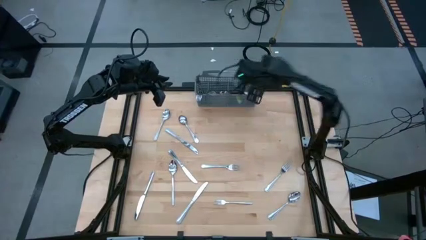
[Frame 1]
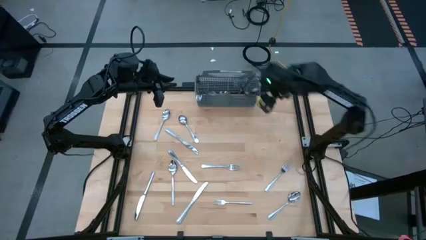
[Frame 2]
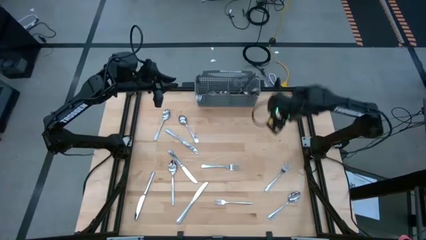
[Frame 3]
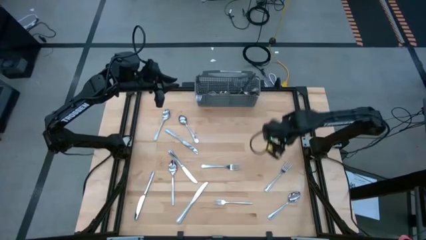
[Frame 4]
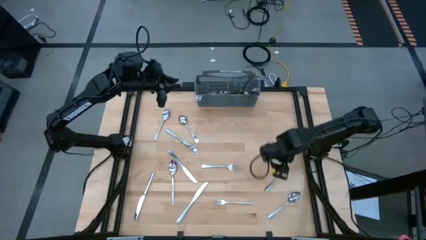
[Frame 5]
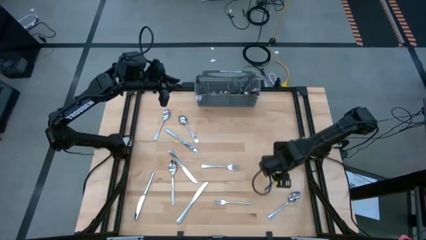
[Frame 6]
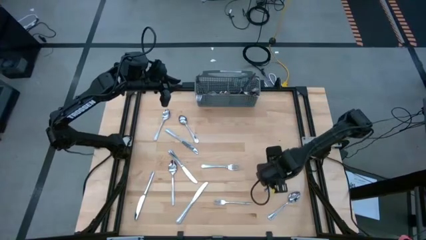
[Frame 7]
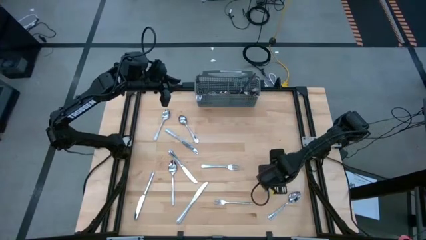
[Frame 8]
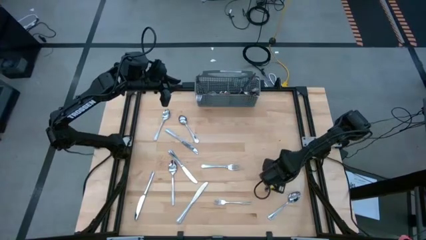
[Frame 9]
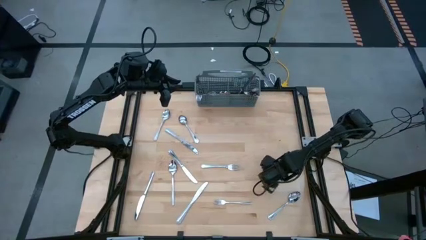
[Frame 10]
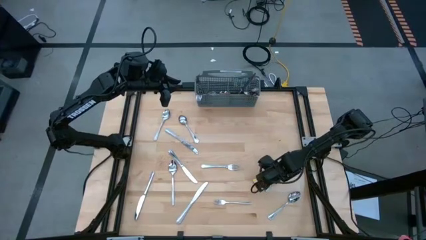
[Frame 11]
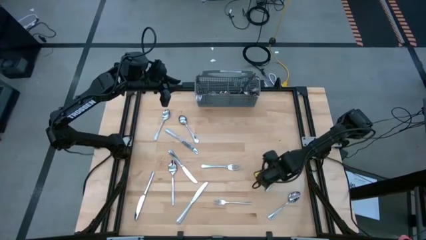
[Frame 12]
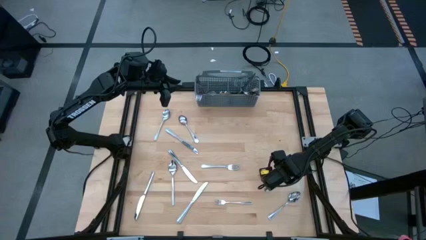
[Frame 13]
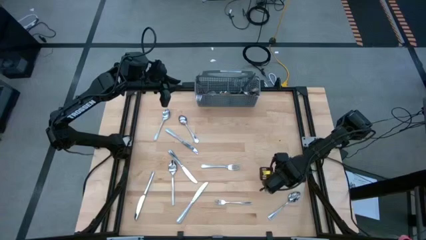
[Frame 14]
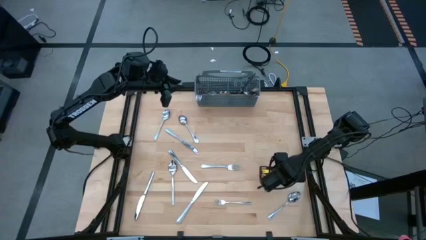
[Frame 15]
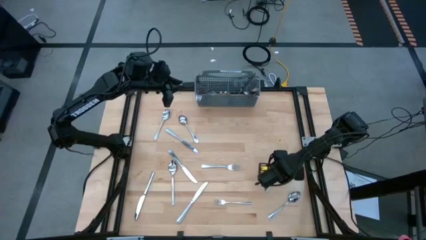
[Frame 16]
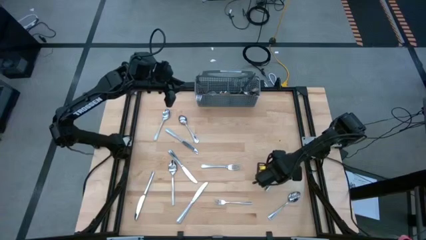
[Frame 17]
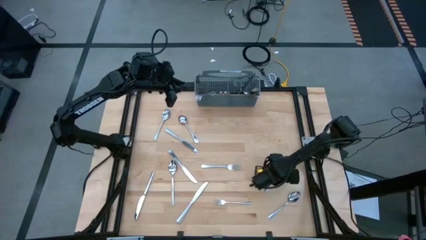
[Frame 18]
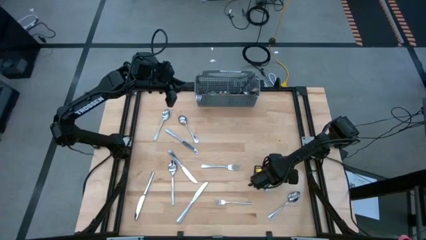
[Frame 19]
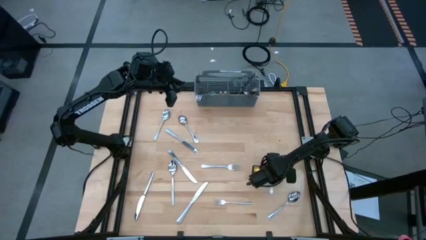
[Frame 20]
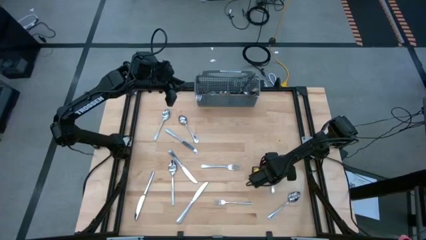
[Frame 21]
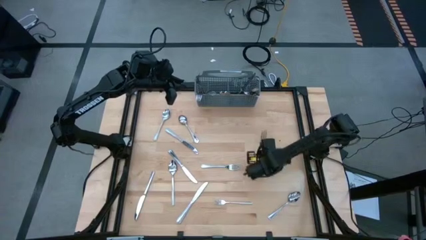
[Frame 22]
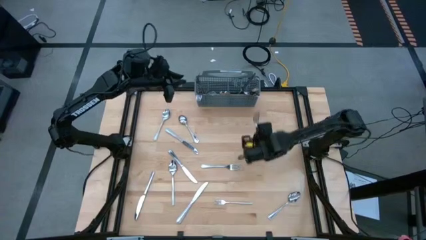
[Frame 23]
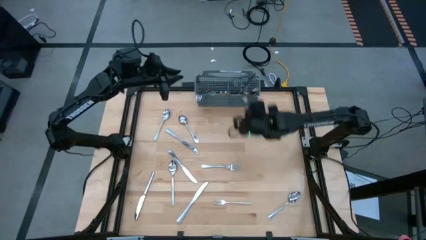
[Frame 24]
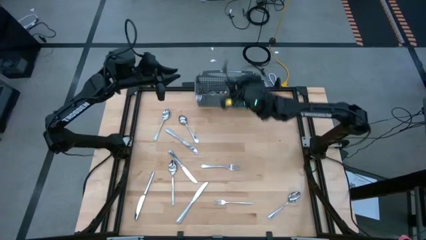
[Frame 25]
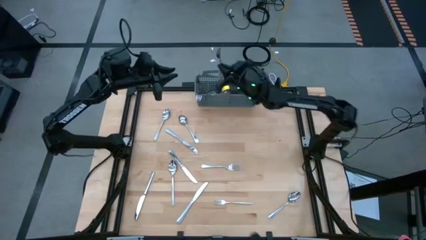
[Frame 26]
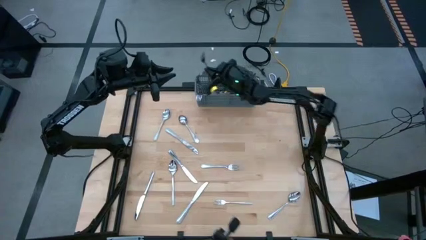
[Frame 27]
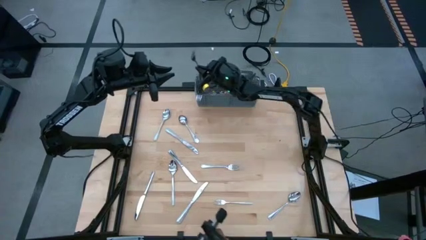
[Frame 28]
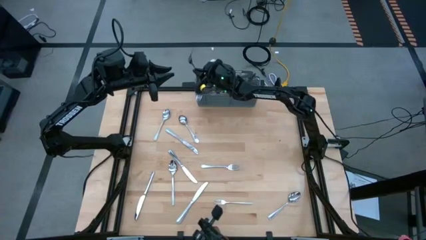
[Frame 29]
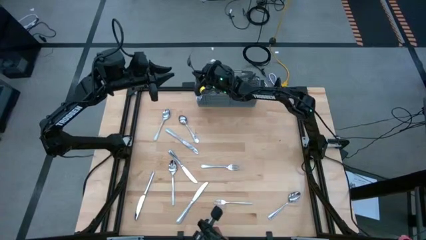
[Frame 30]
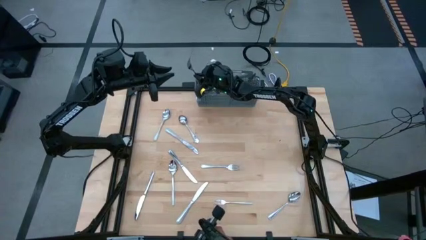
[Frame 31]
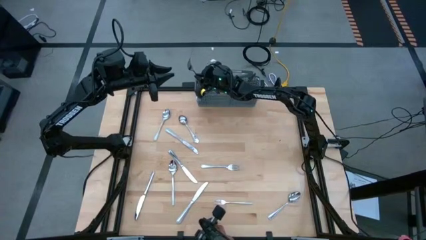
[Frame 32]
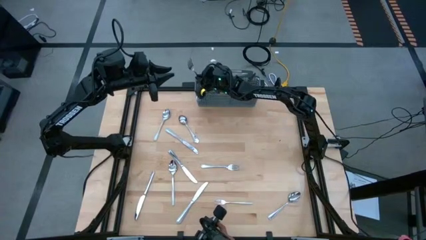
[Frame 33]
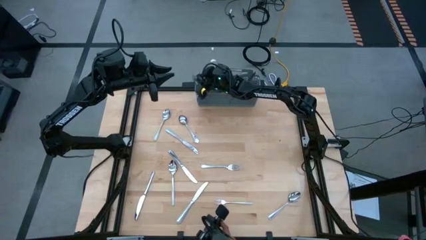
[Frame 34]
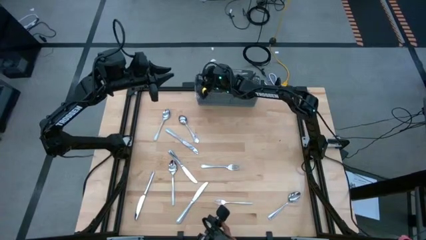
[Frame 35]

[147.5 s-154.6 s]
Task: Sort silverware
Put the silver fork into the silverware organizer

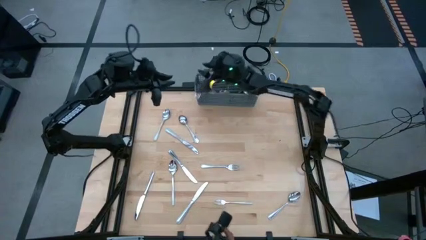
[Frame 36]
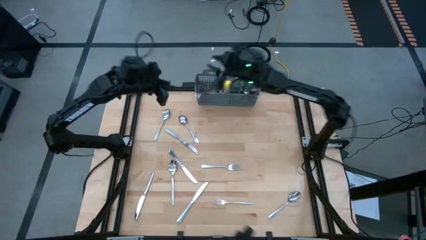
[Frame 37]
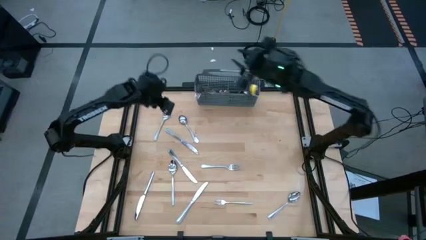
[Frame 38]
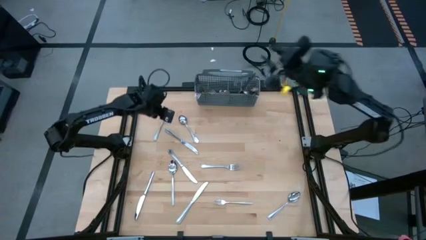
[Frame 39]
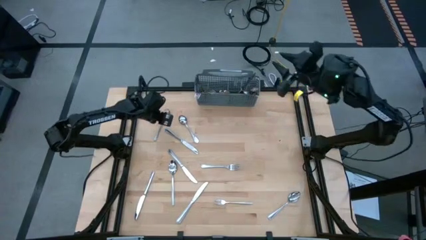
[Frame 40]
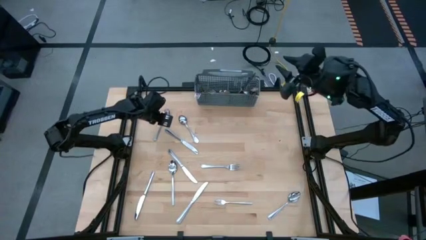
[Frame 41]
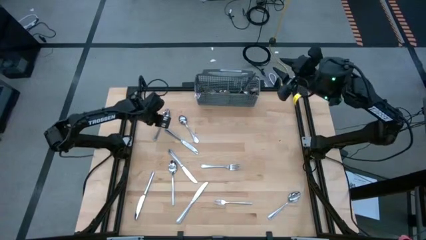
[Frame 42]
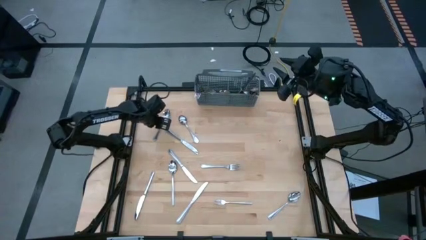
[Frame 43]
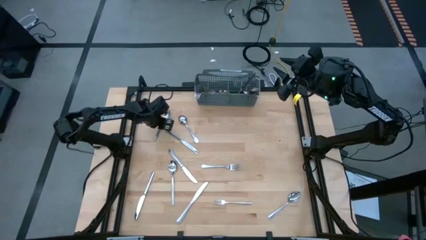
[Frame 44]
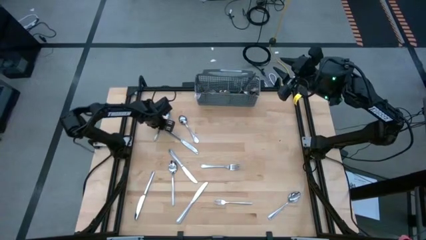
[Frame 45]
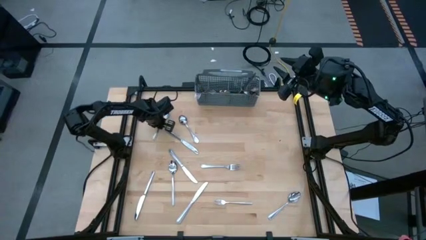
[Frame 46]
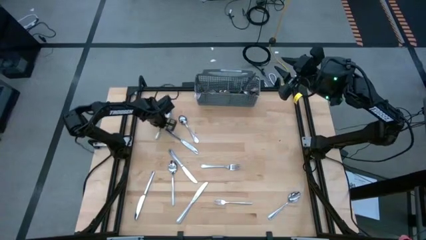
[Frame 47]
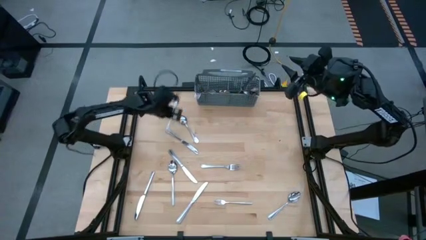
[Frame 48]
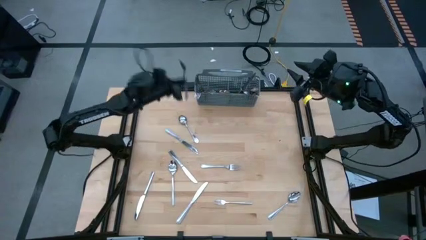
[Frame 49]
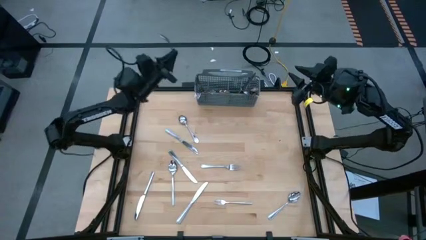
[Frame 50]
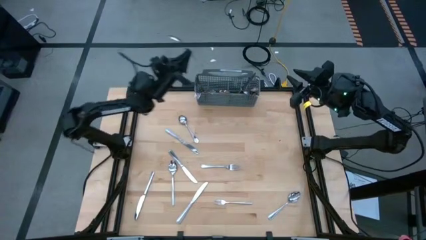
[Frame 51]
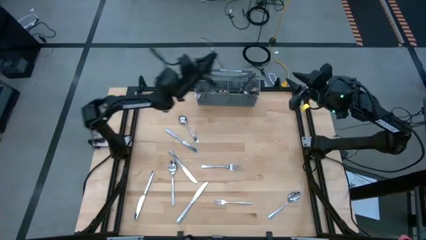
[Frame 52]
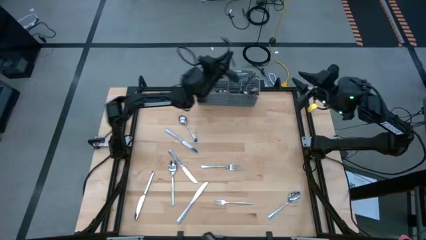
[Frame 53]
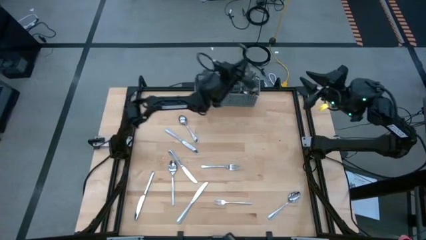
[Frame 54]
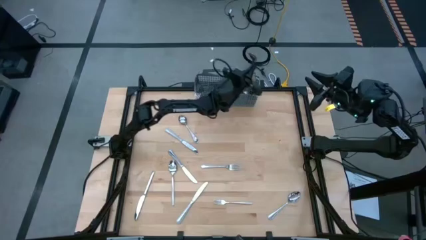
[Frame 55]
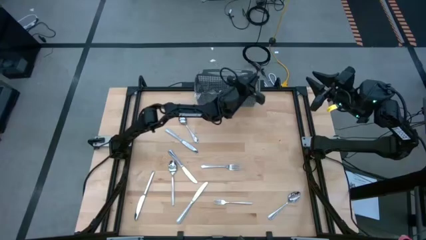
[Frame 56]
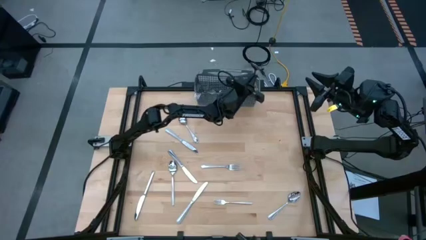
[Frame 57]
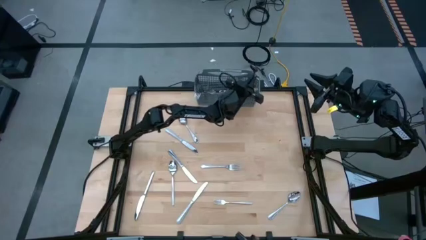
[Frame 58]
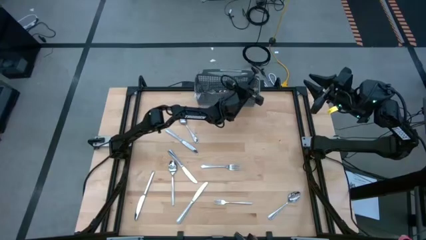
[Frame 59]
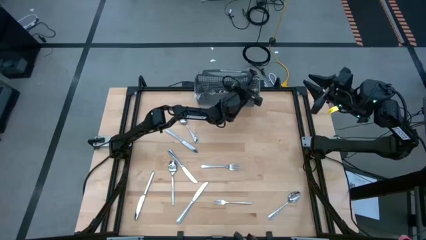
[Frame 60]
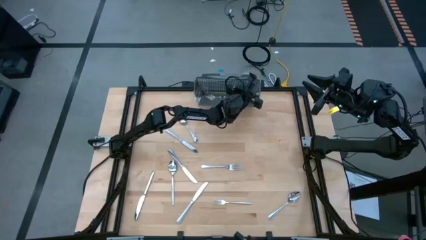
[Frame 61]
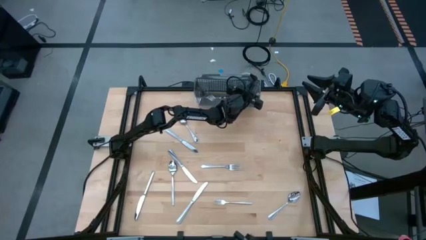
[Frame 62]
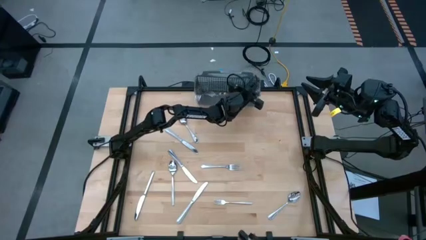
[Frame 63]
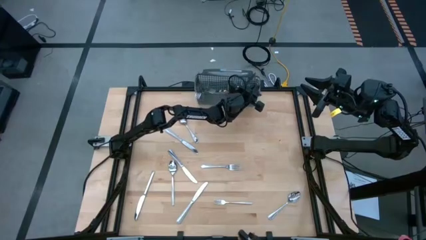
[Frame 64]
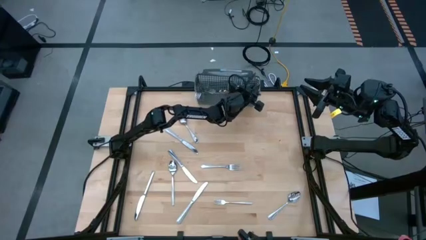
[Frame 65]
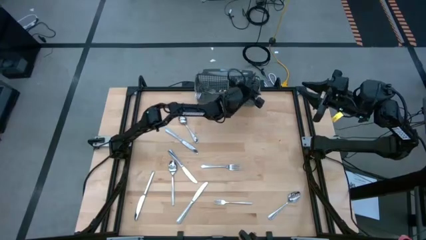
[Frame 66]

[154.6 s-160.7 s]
Put the silver spoon into the silverware organizer

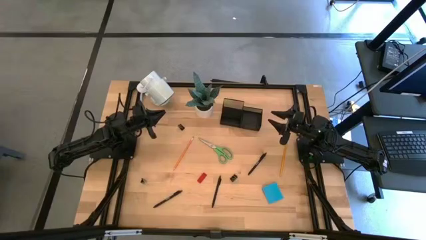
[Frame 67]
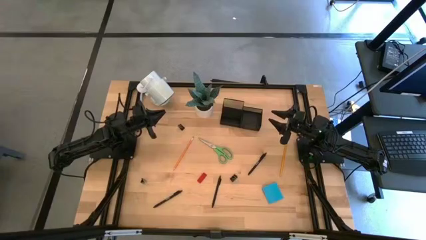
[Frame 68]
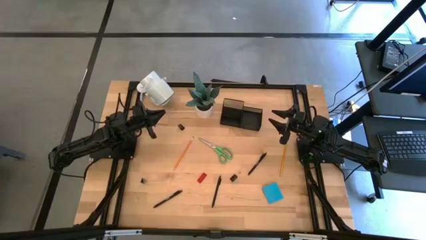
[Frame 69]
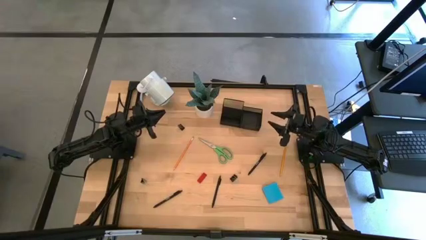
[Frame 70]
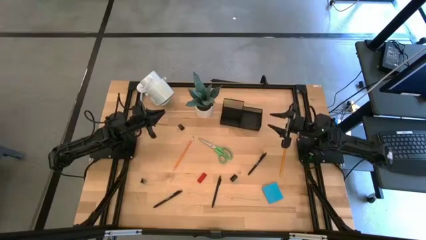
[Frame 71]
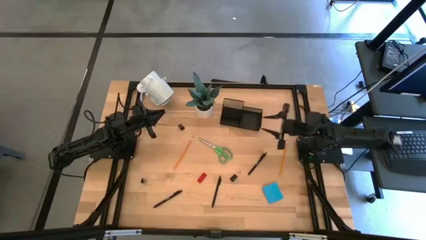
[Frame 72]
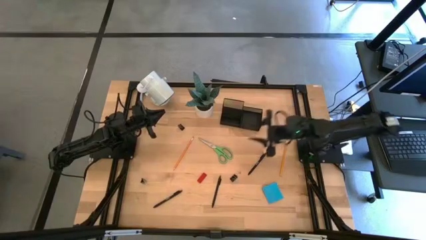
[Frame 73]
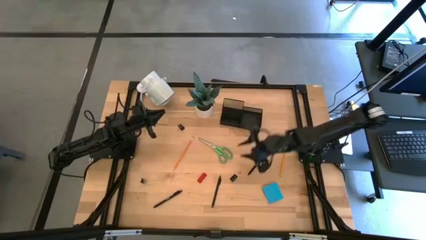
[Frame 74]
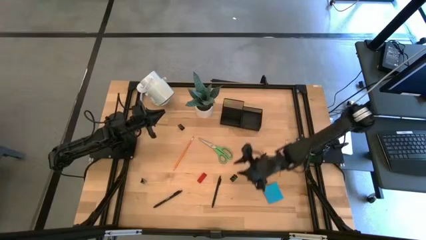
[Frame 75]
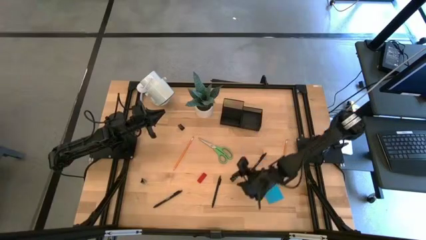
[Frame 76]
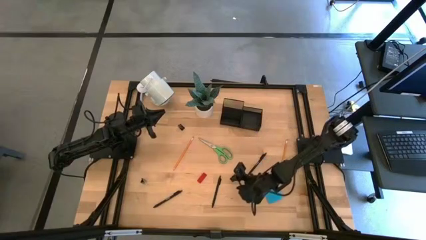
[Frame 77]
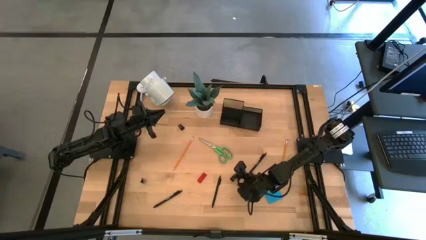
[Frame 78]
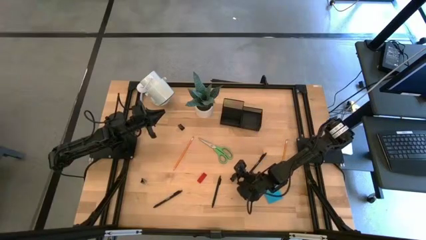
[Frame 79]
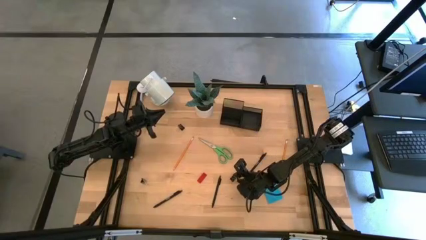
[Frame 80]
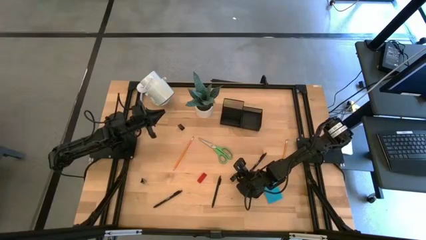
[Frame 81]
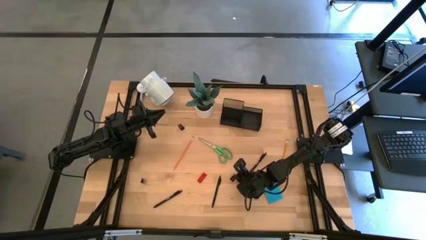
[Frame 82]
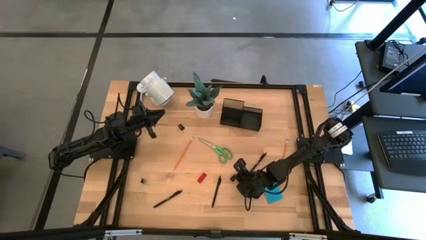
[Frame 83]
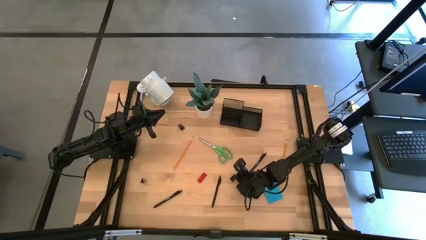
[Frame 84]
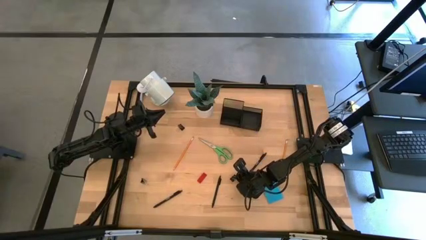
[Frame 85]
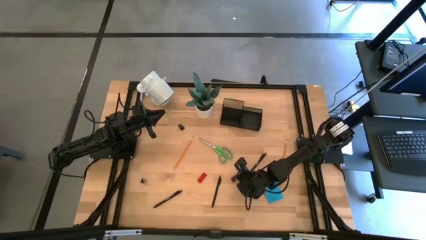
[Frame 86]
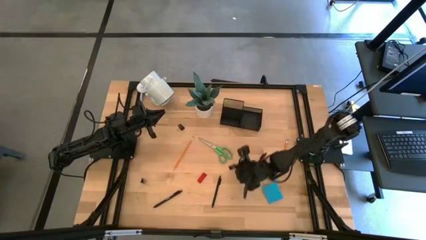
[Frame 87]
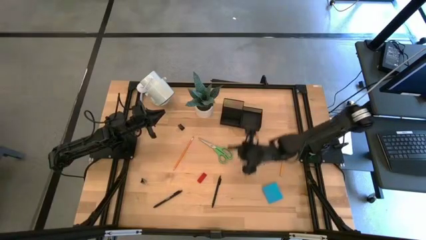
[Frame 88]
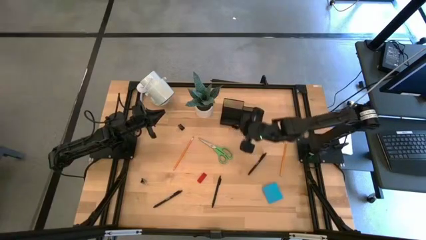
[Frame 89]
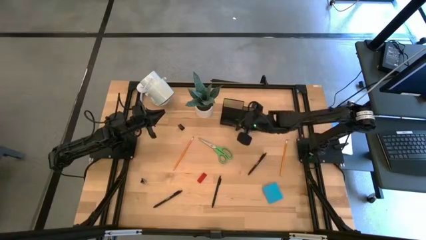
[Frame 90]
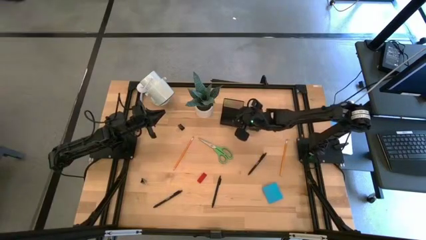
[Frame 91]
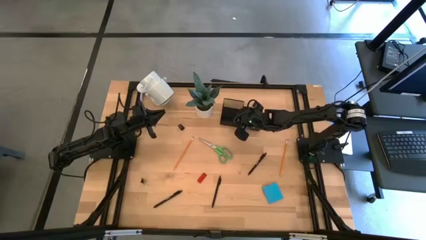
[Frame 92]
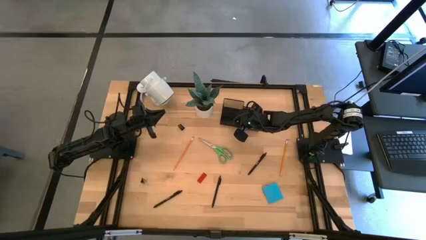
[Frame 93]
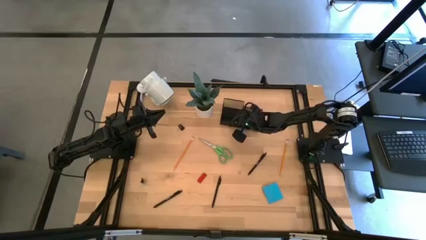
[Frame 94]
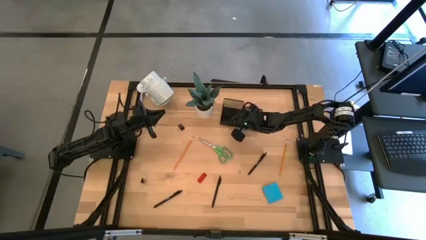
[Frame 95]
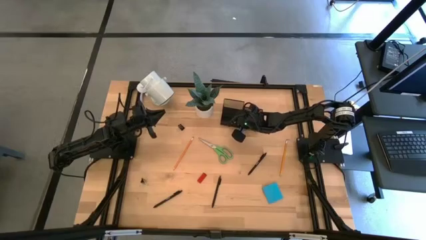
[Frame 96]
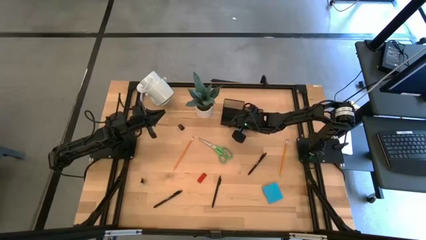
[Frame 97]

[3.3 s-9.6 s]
Task: Pick and place office supplies into organizer
Put the bottom right black binder clip into the desk organizer
